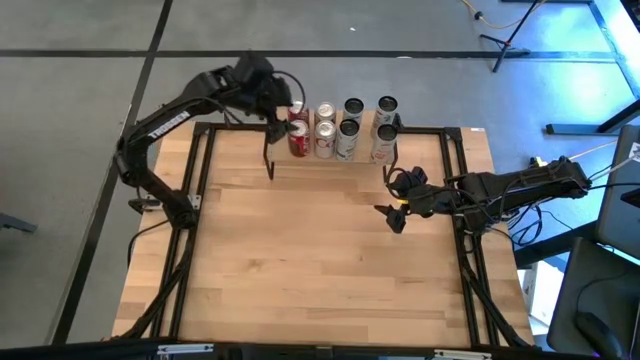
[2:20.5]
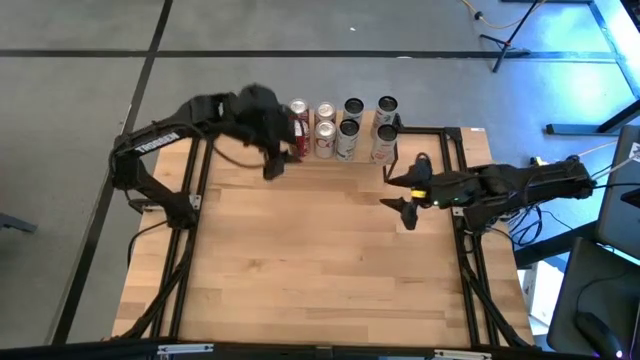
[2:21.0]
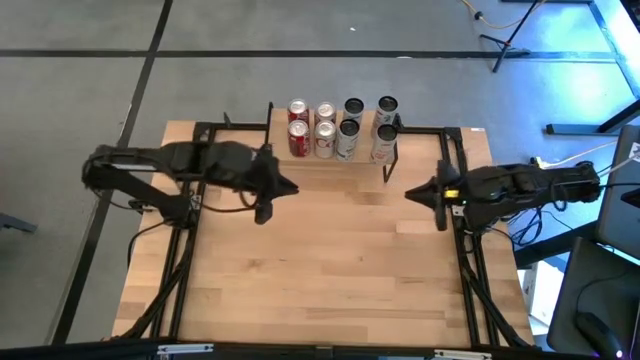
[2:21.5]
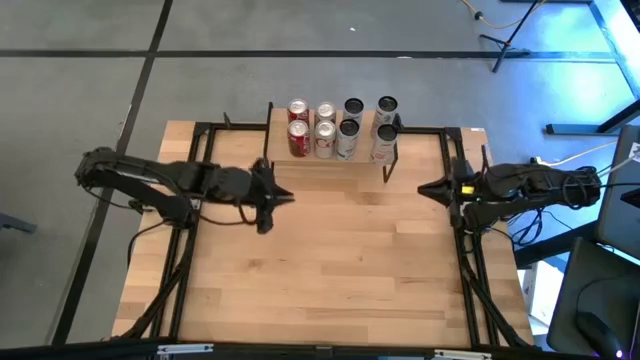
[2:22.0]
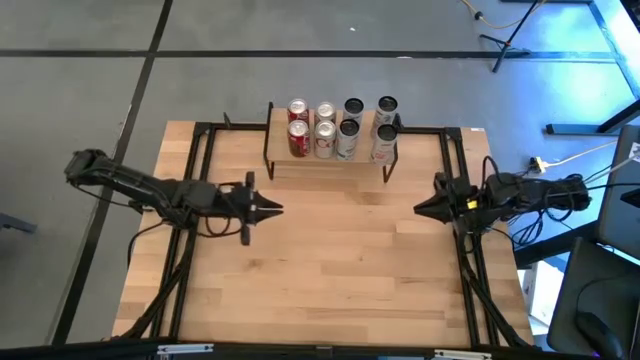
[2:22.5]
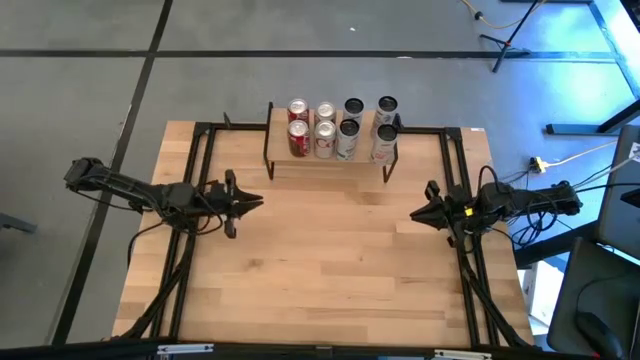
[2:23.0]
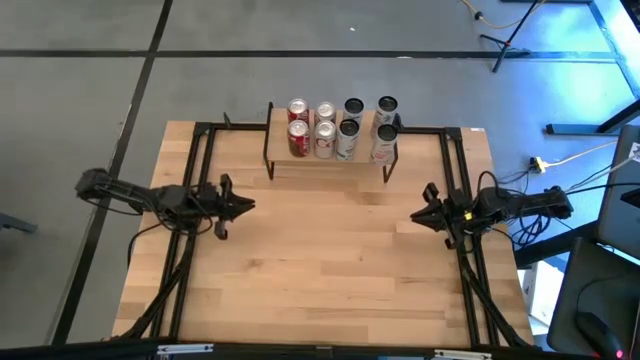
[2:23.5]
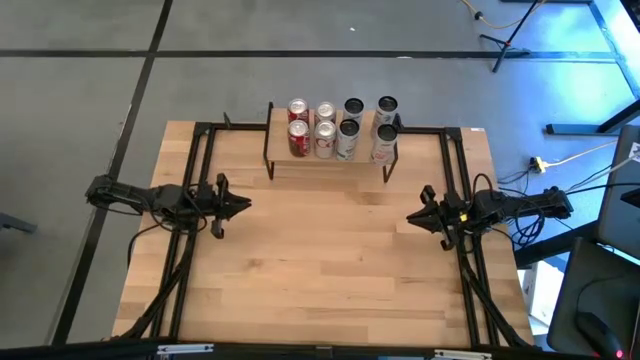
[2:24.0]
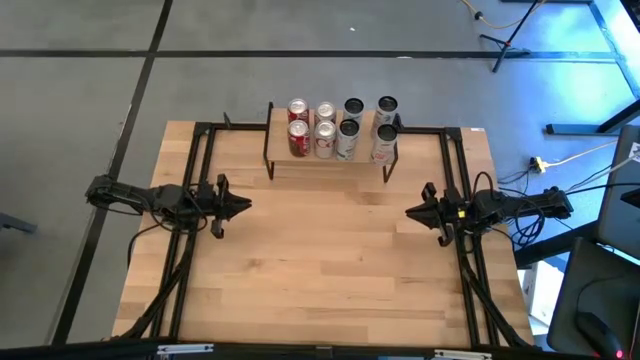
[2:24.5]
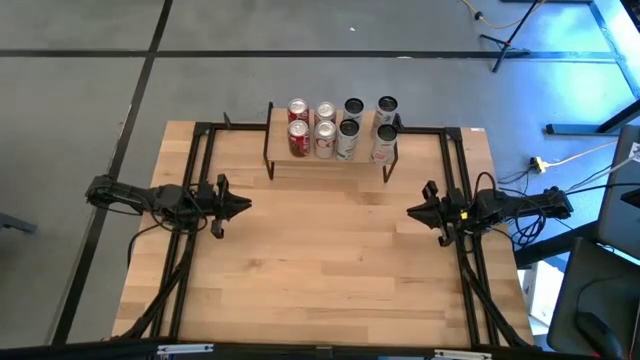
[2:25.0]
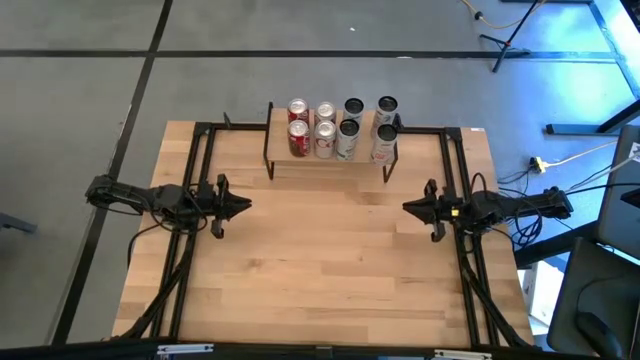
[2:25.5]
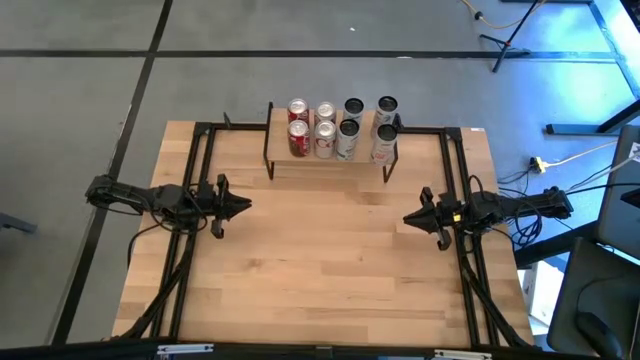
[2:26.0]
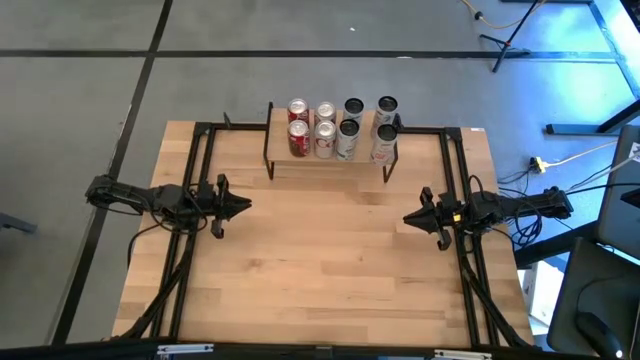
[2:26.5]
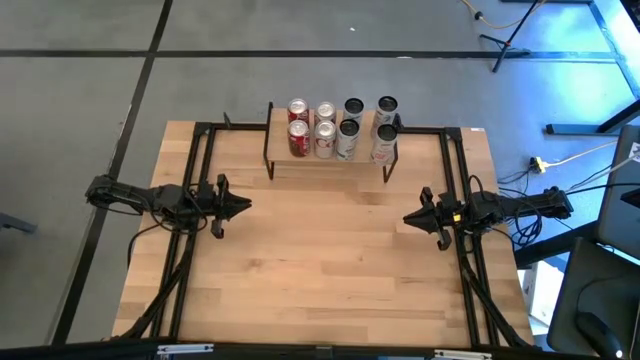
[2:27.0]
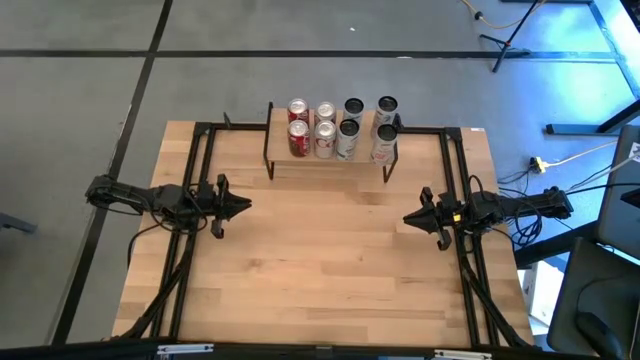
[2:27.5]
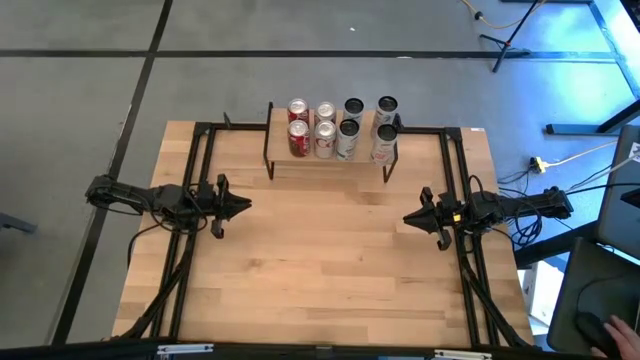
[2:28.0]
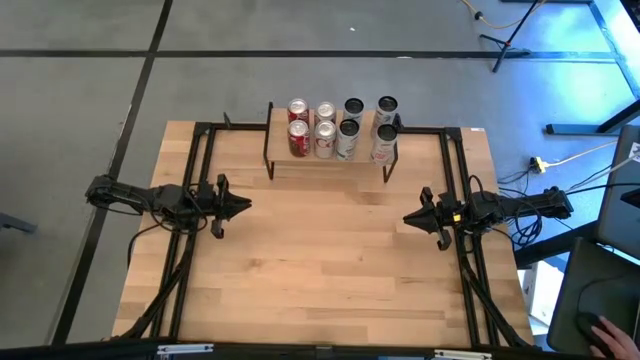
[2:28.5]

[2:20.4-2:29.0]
Task: Place canned beverage on shelf
Return to Home Position

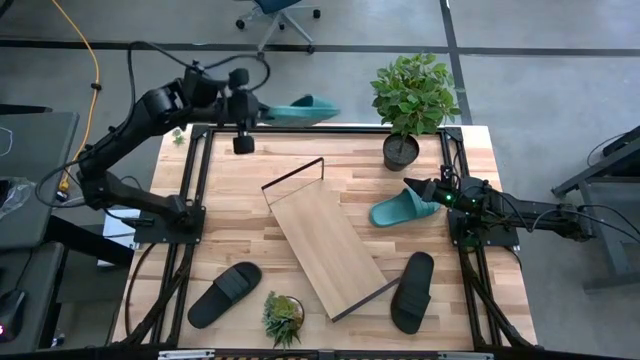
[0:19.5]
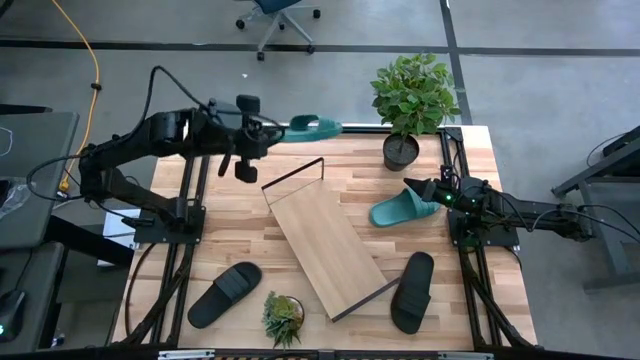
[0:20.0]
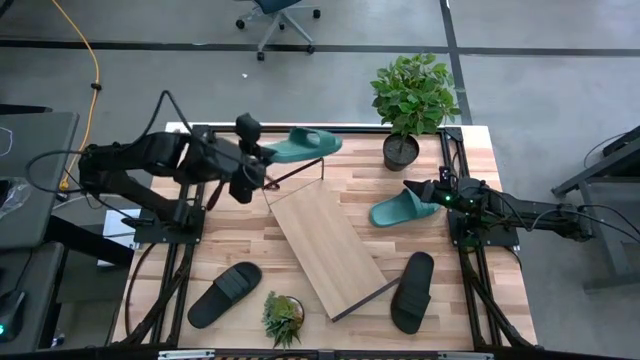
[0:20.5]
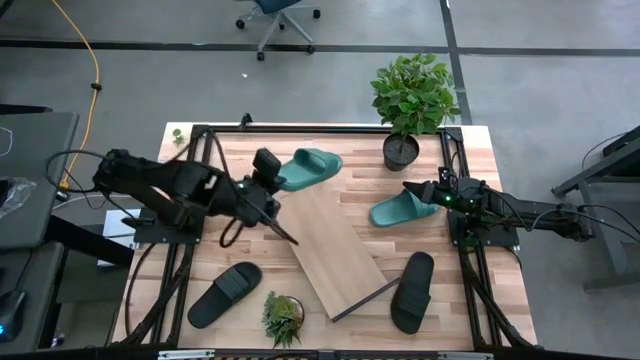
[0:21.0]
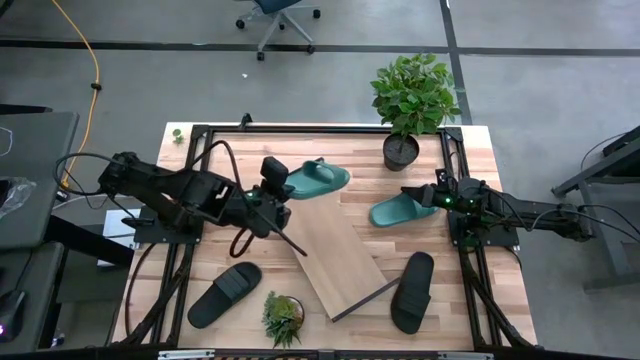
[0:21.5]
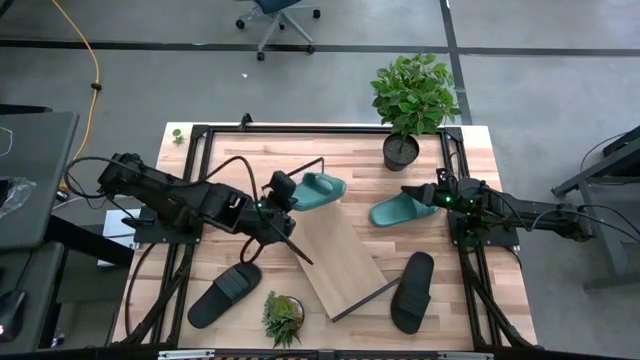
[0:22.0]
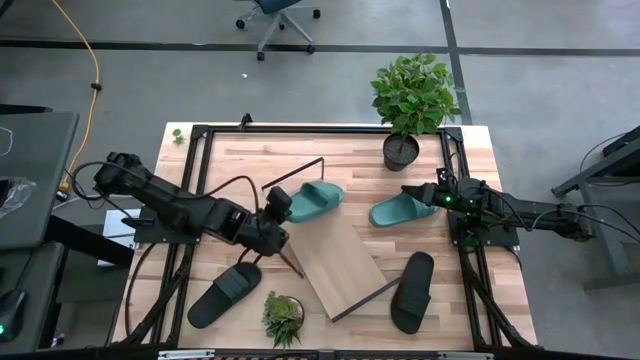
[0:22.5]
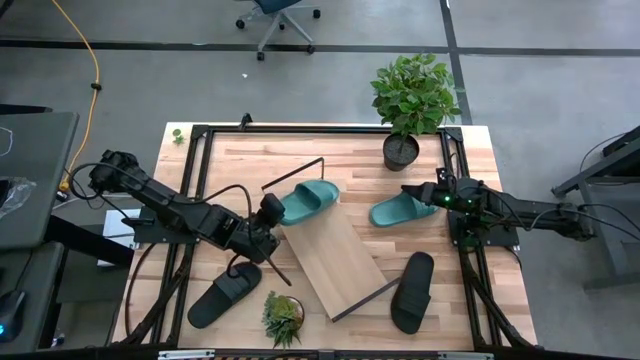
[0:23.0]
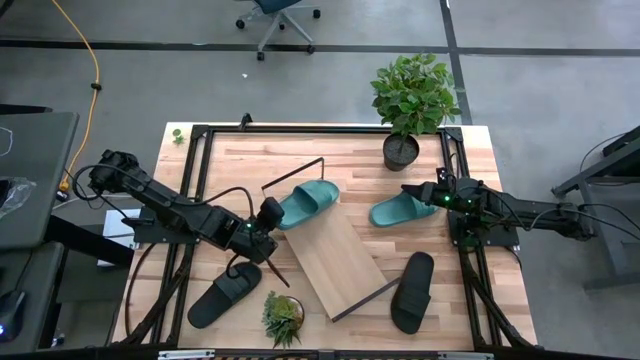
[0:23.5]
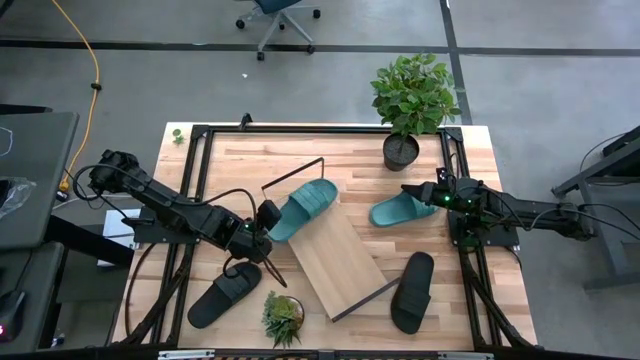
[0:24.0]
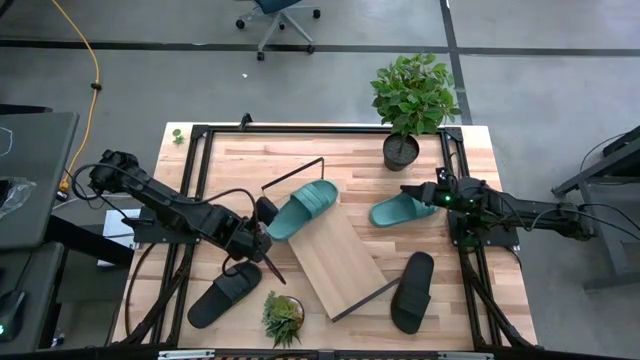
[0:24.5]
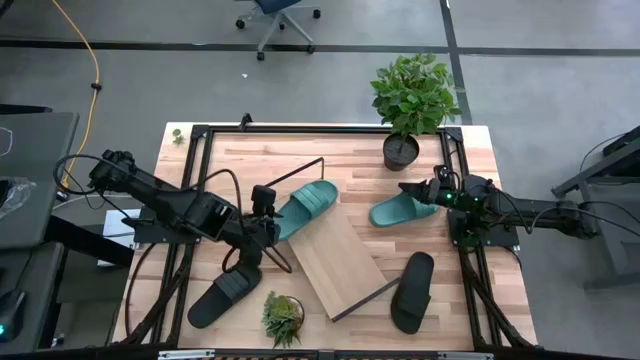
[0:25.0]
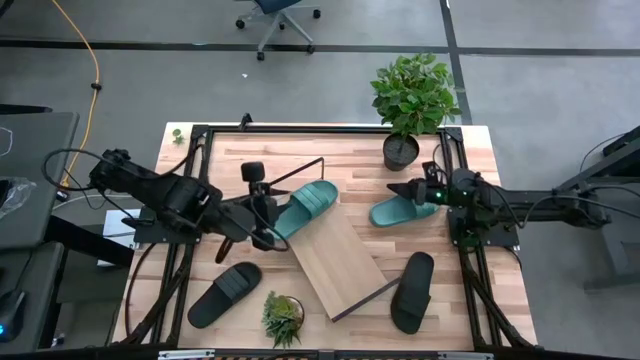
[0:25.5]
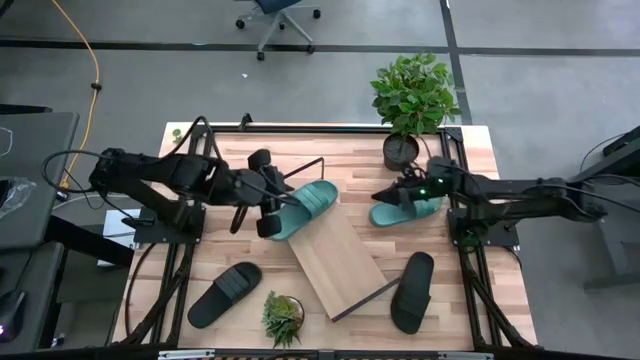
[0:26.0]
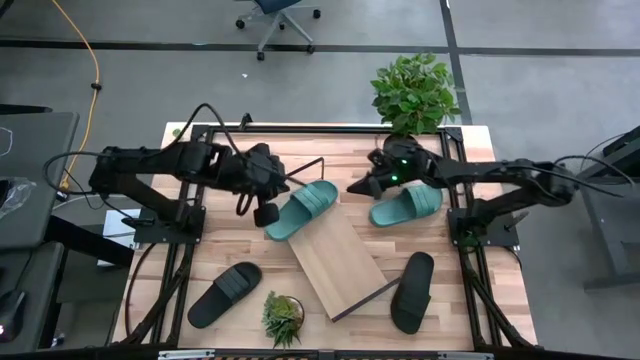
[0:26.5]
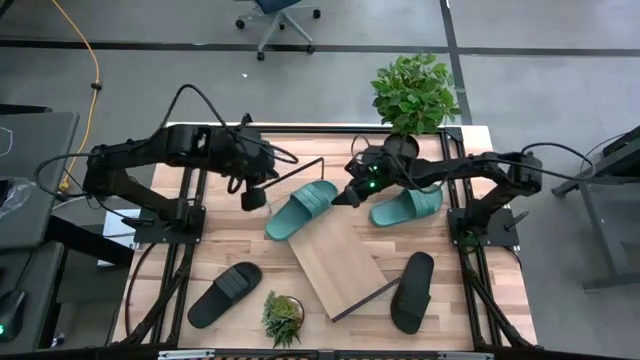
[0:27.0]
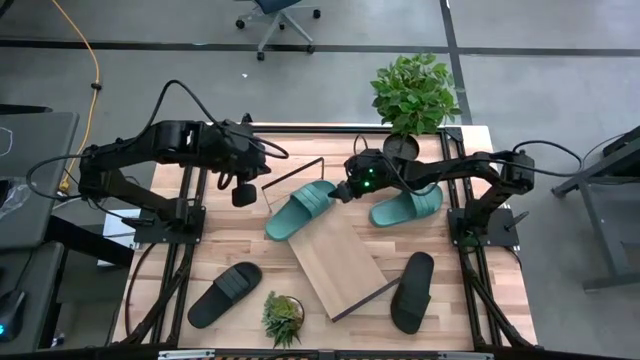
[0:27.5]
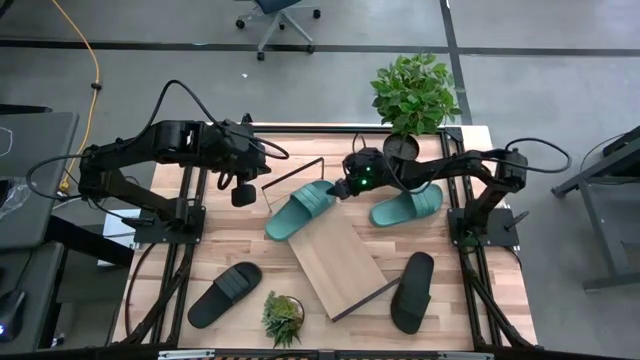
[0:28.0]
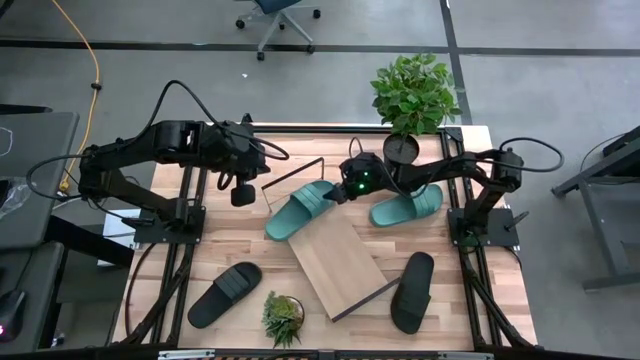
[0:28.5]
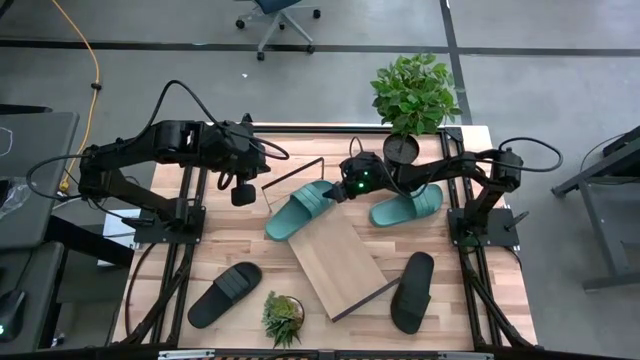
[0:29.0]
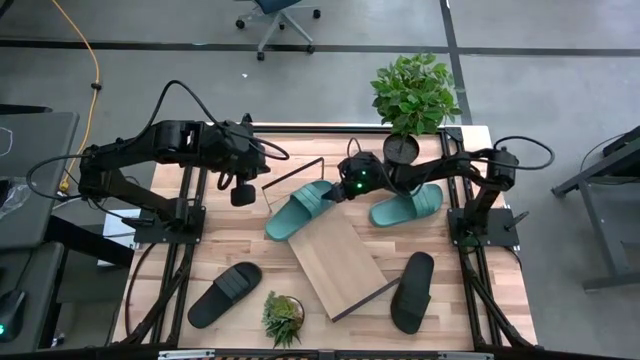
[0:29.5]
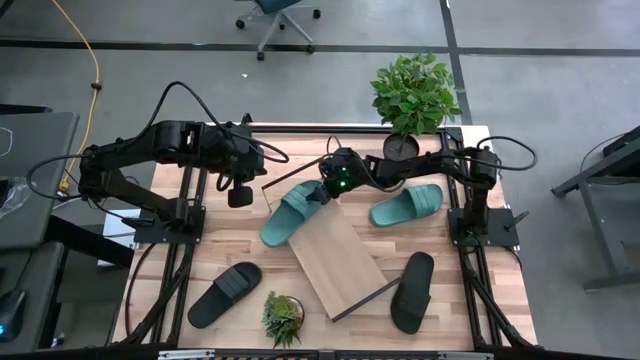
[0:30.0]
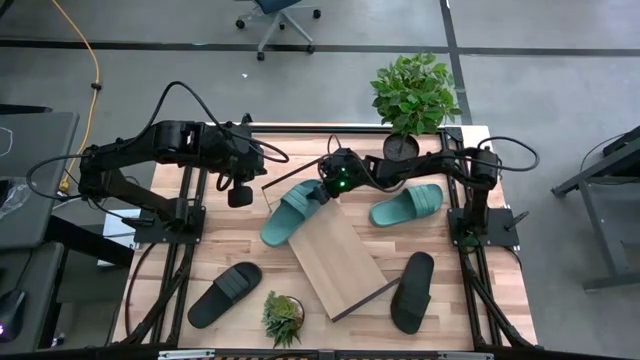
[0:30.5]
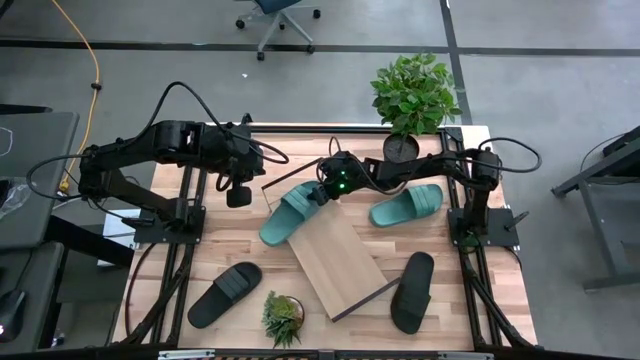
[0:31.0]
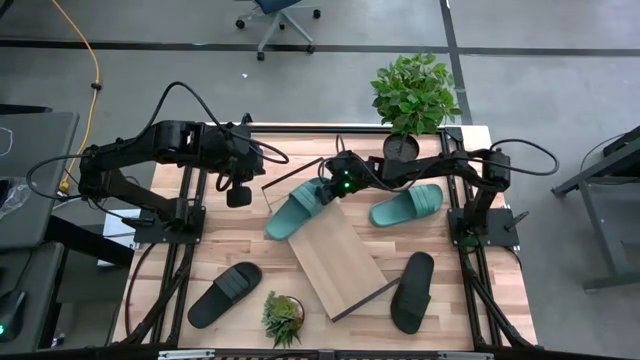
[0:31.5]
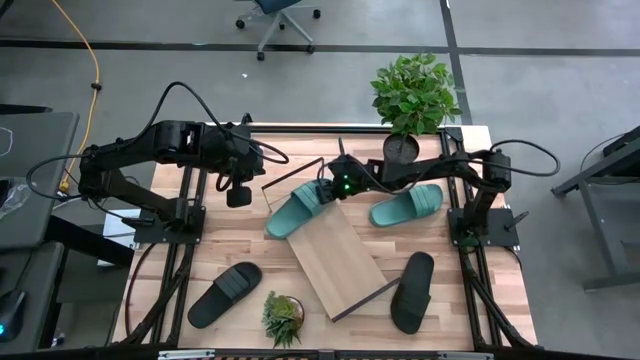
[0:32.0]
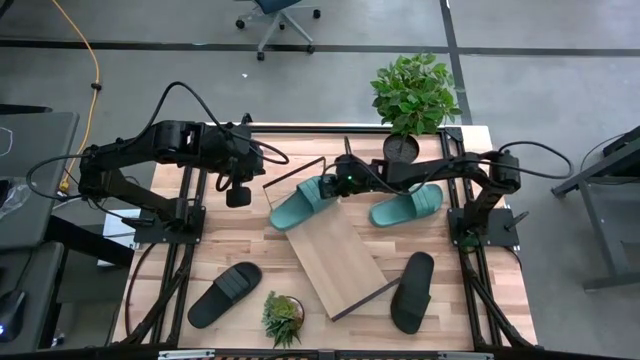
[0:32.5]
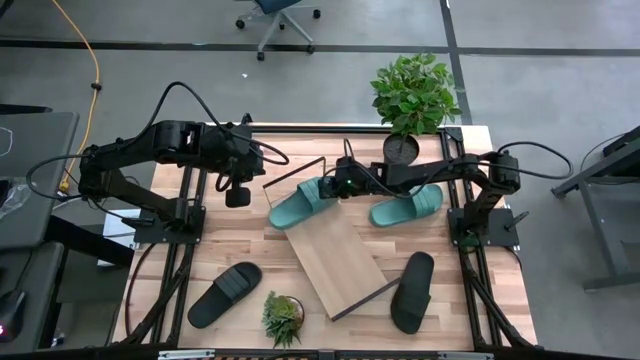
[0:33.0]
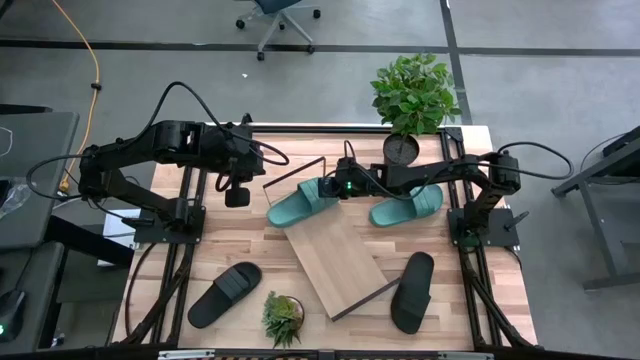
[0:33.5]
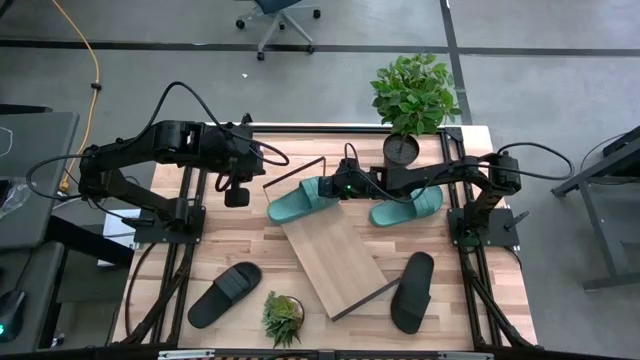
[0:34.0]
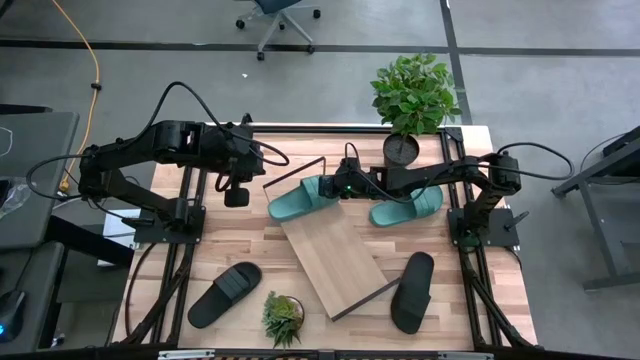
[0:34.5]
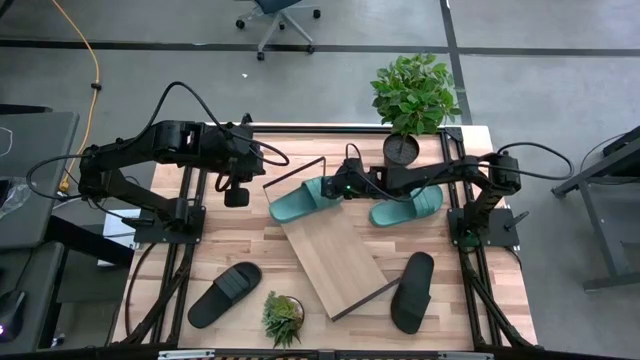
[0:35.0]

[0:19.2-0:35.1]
Task: Pick and place slides into the shelf
Put the top green slide on the shelf
